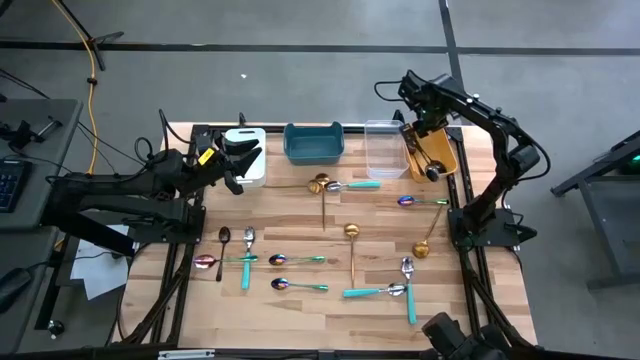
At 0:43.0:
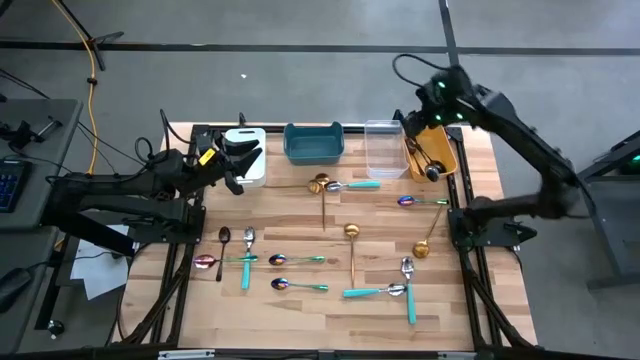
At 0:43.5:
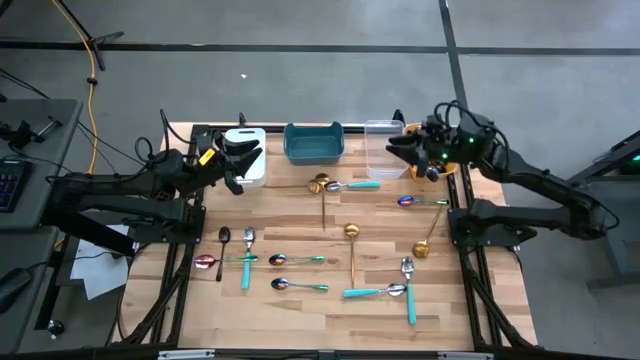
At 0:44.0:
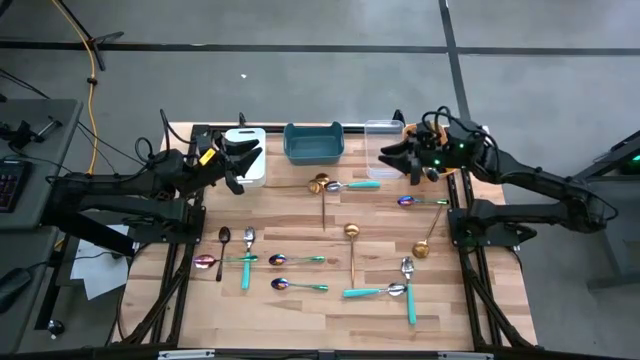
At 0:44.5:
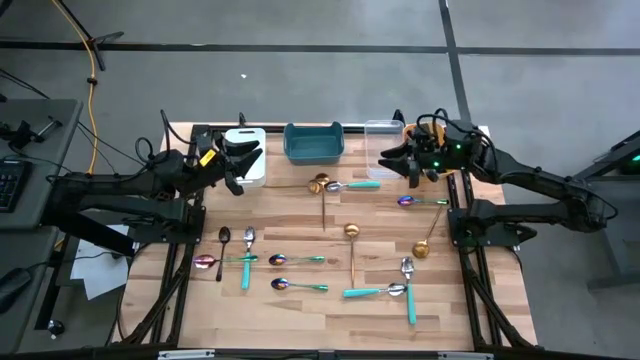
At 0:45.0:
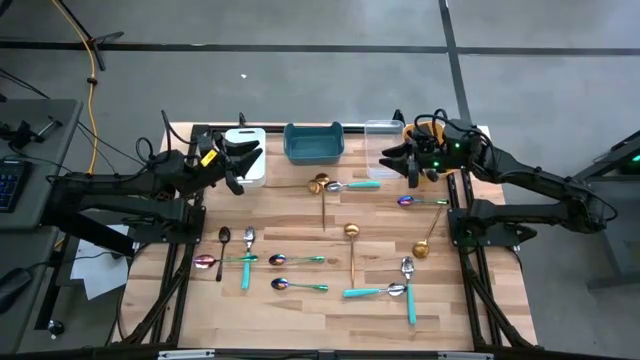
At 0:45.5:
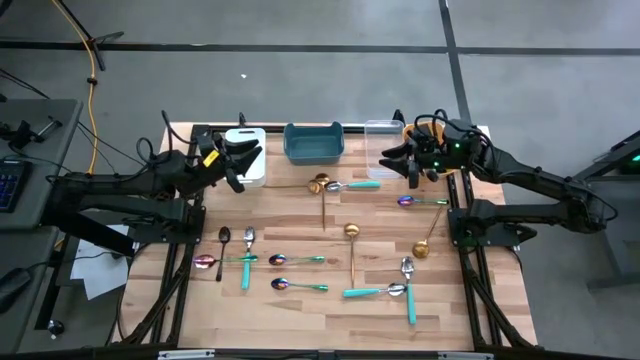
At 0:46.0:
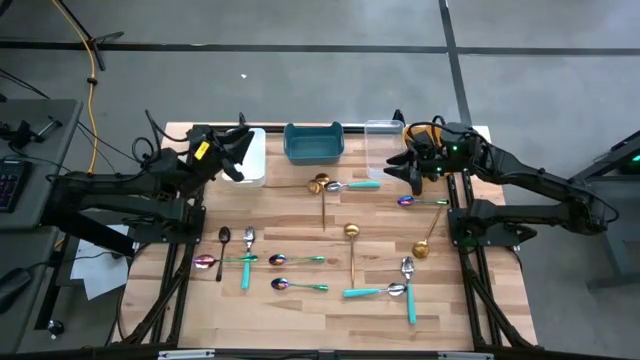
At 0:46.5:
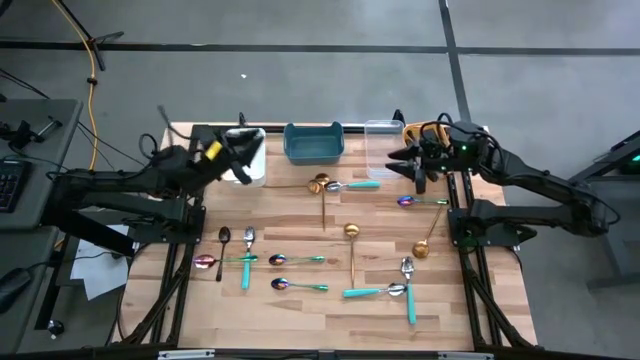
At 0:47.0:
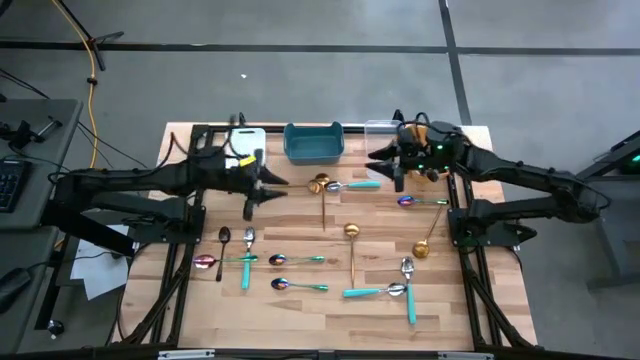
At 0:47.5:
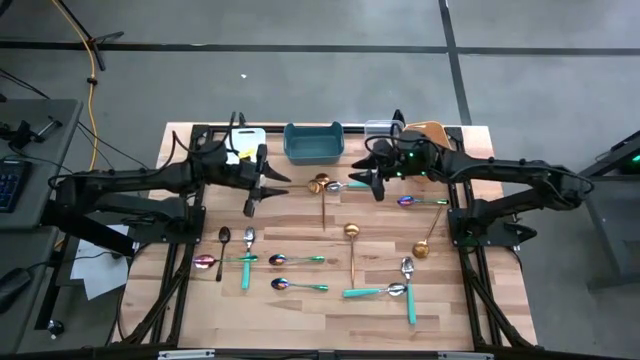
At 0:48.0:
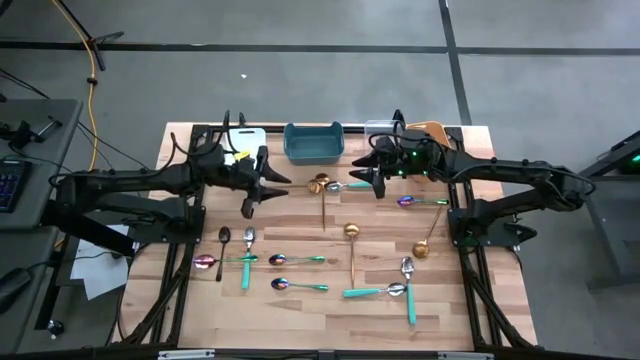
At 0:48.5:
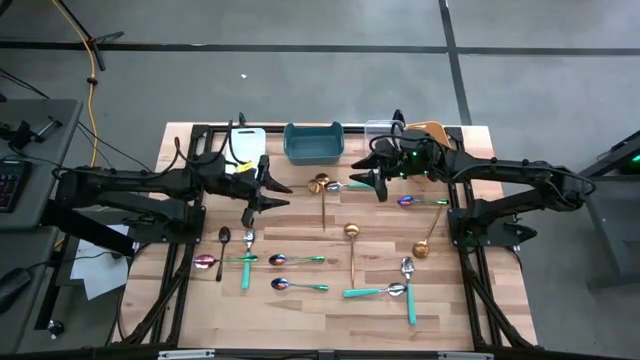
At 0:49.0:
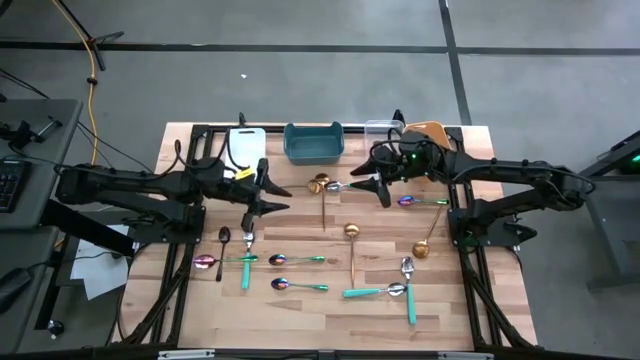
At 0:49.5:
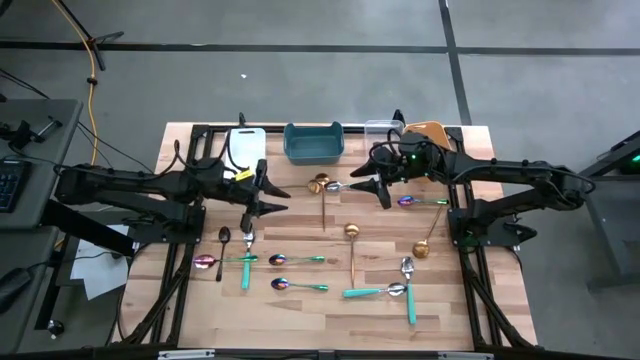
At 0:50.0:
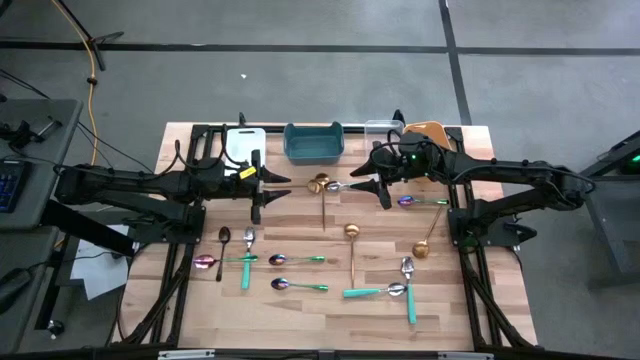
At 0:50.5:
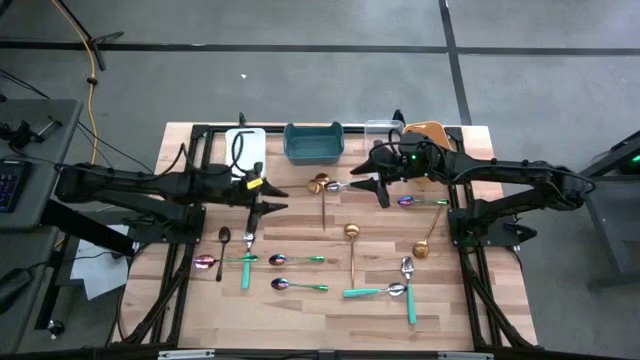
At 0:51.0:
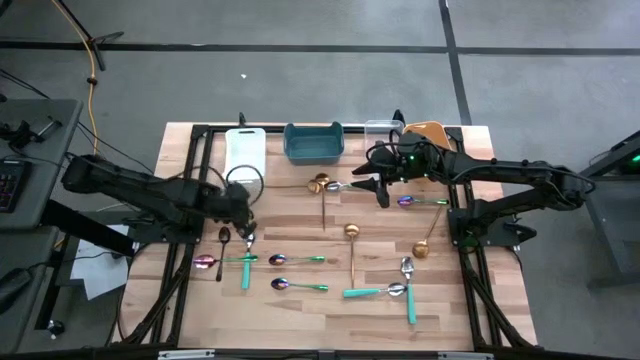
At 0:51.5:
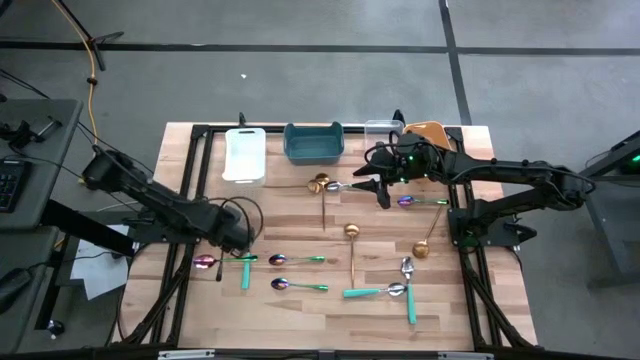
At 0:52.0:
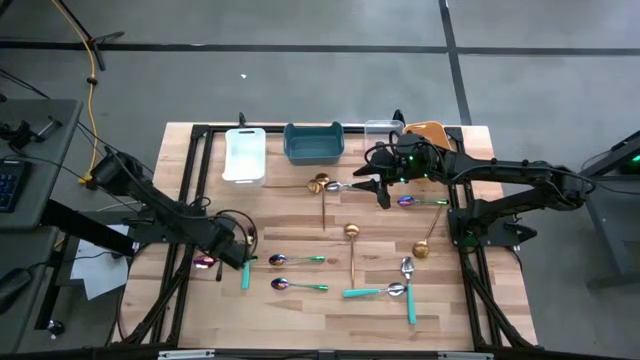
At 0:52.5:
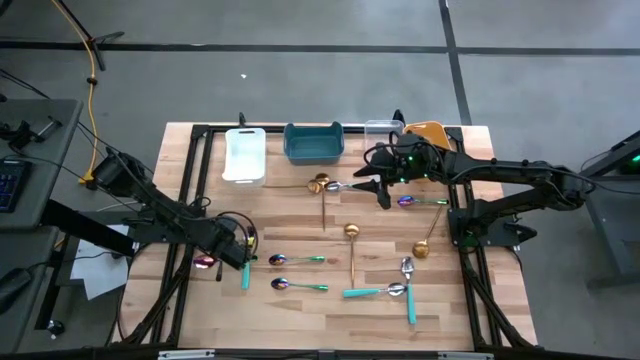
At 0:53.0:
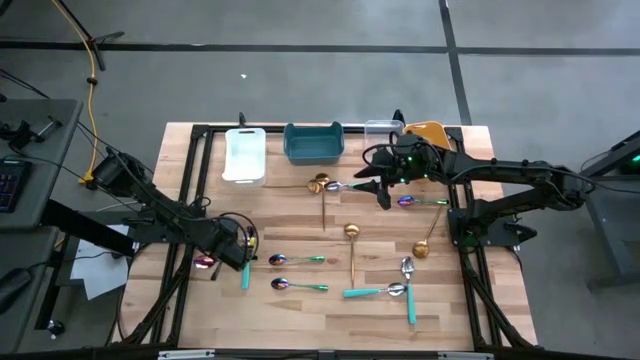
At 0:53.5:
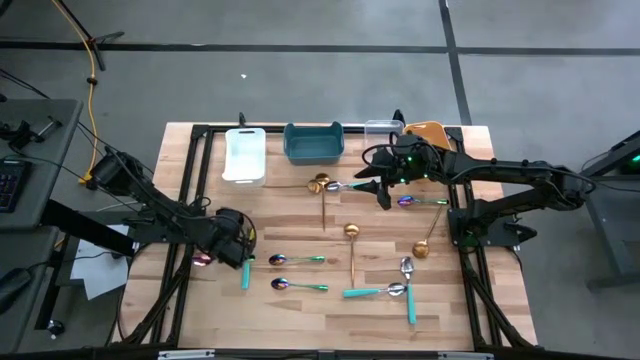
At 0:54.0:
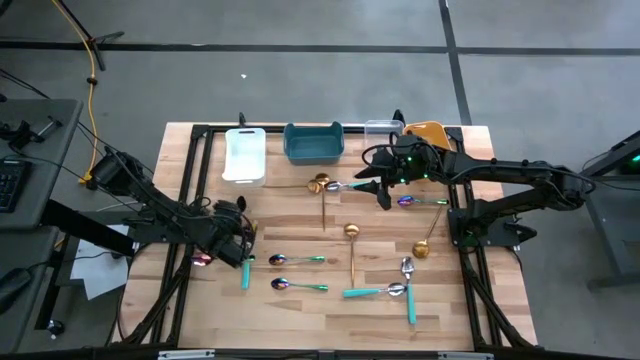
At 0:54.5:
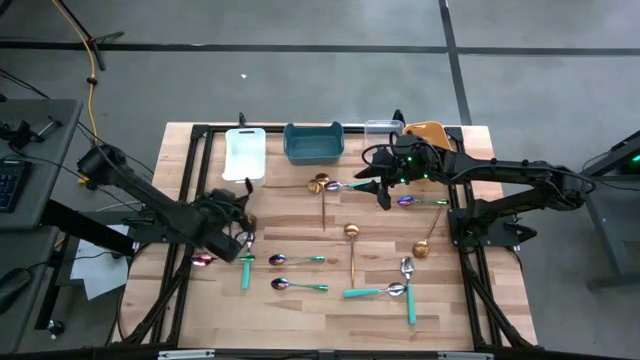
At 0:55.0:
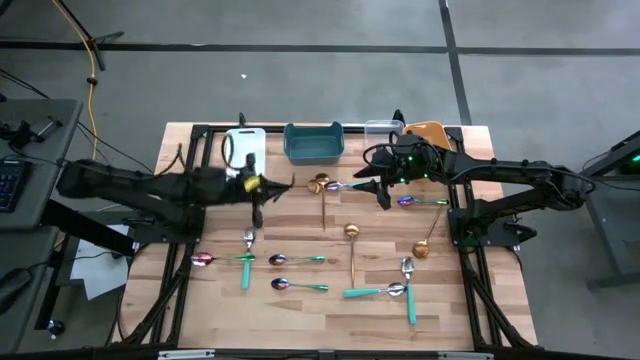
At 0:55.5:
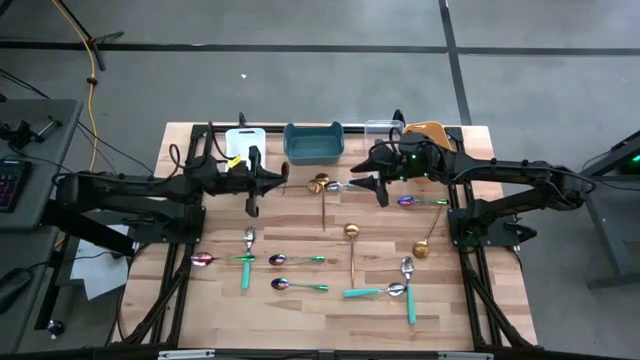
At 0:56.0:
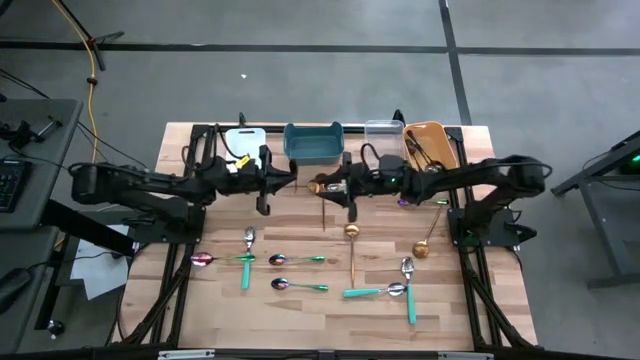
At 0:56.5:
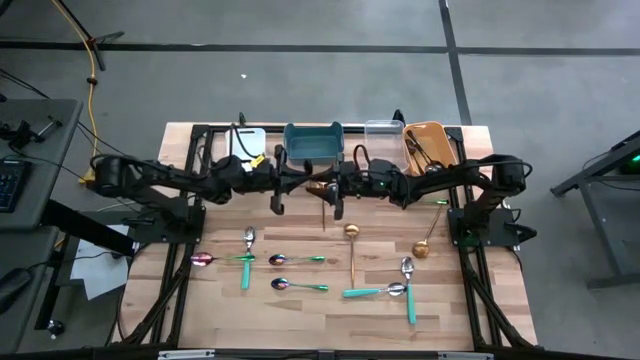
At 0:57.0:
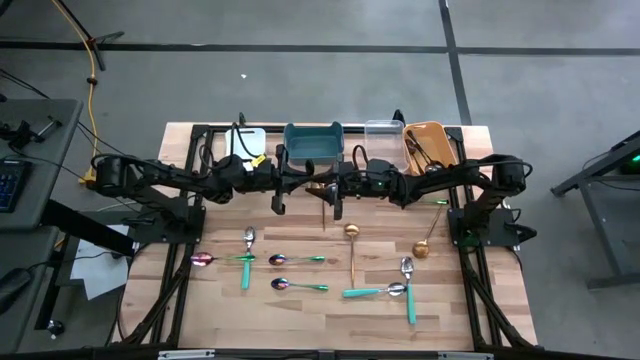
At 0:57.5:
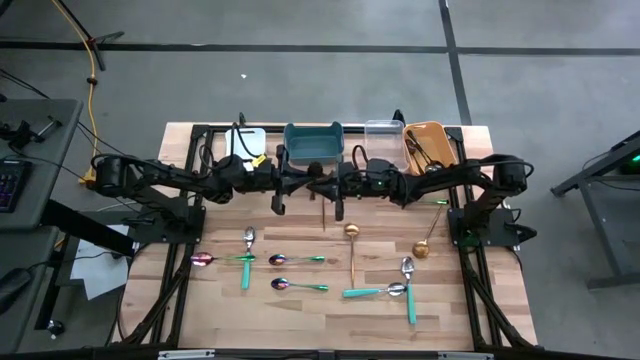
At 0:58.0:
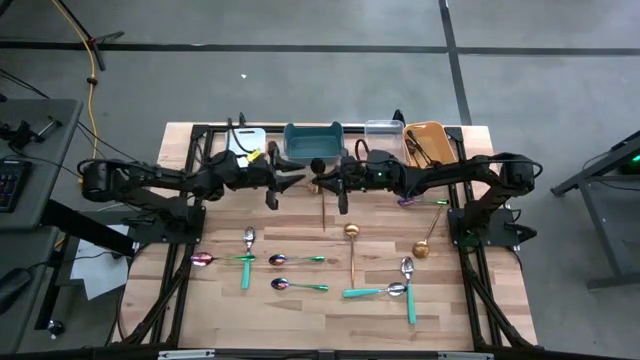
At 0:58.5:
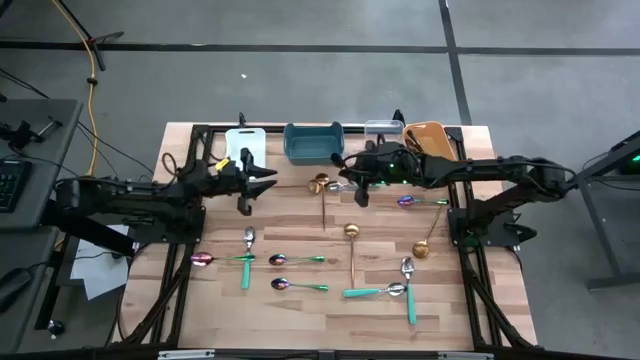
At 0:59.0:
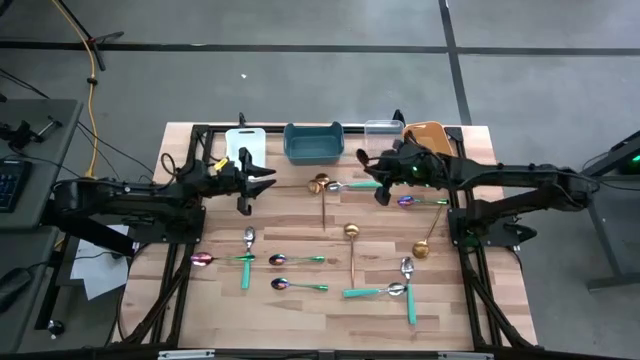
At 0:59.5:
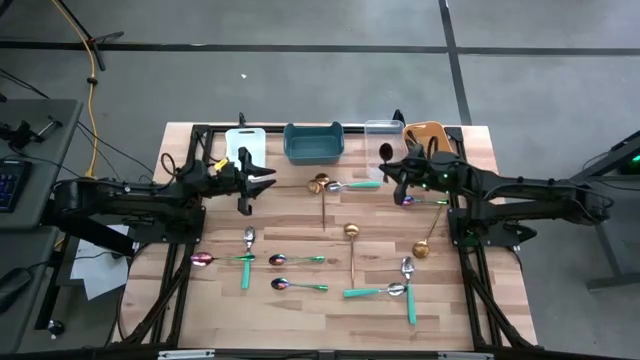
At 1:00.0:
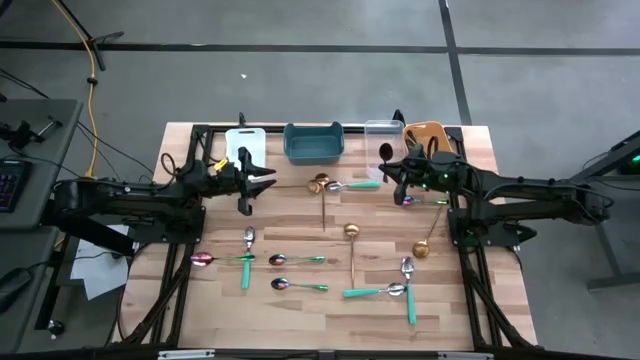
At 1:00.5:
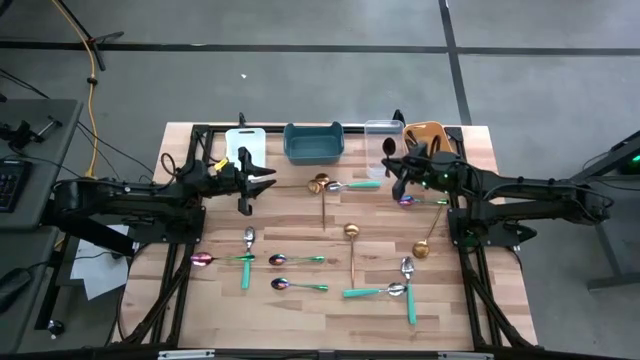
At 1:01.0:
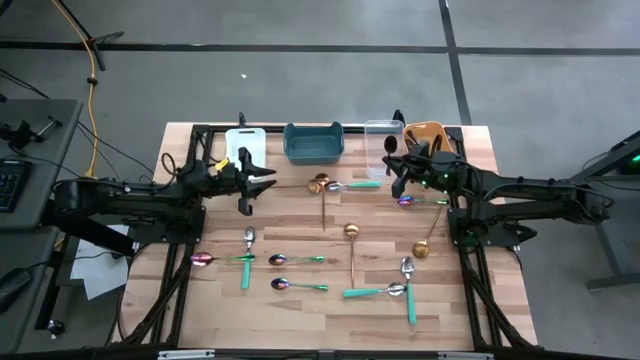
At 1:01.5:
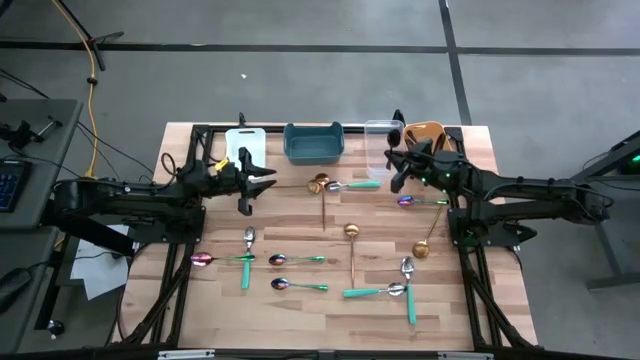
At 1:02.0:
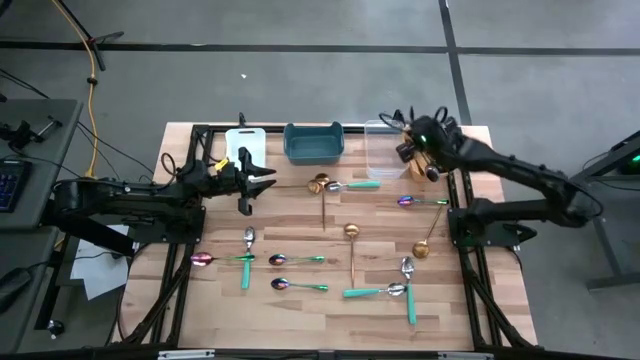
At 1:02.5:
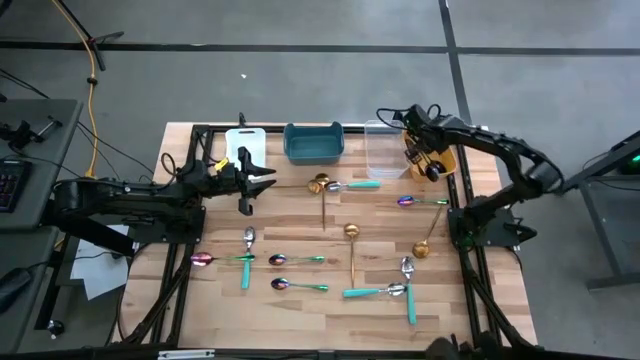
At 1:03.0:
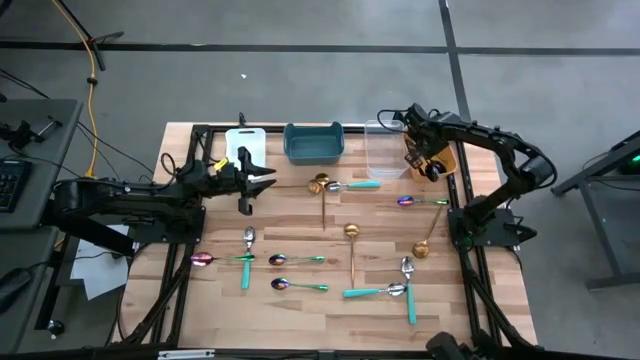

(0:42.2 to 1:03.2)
Task: Sort silverware by color (type)
Put the black spoon into the yellow bin

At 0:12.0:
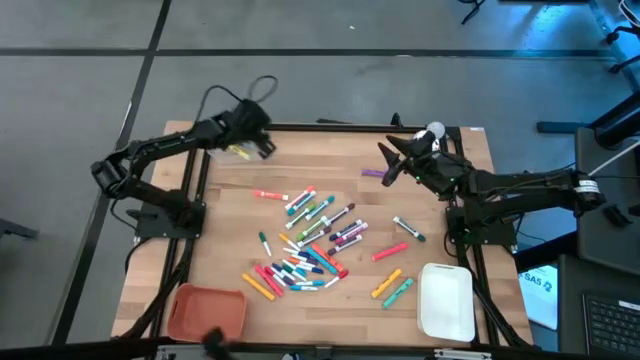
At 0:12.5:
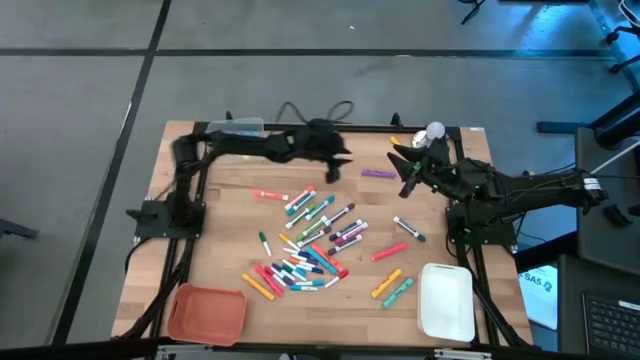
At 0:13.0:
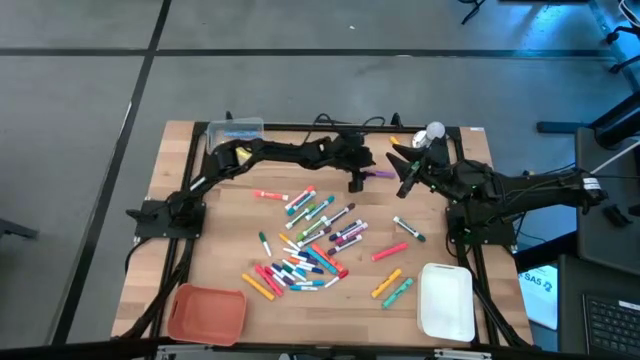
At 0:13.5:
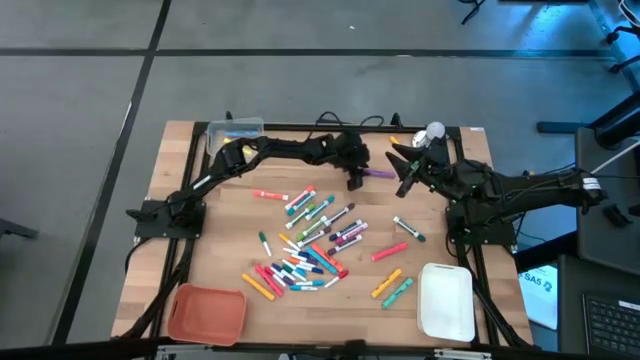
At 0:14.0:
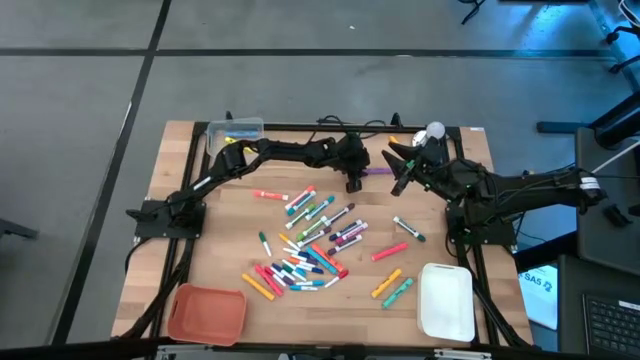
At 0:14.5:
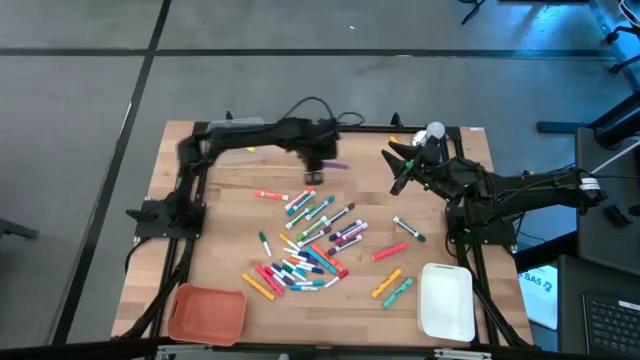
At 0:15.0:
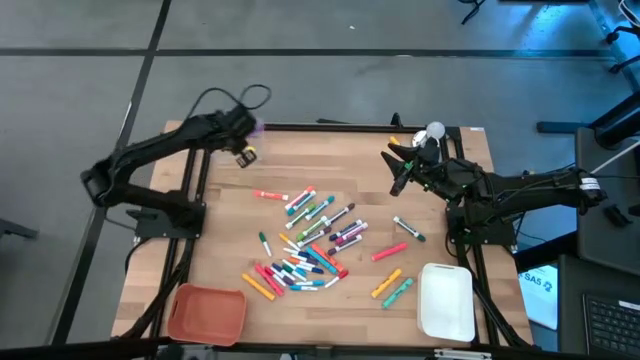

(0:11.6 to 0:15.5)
Task: Pick & Place Markers
Put the violet pen into the transparent bin
